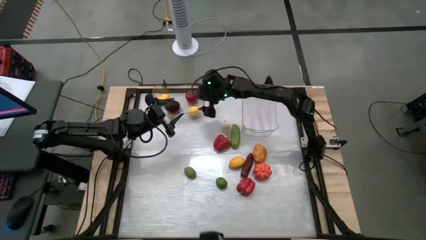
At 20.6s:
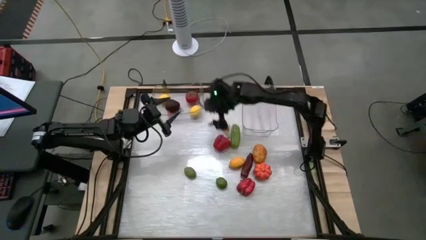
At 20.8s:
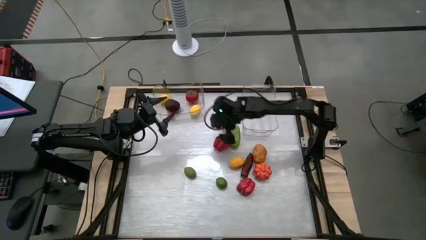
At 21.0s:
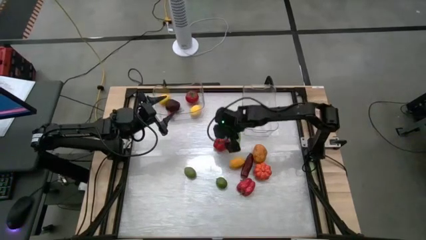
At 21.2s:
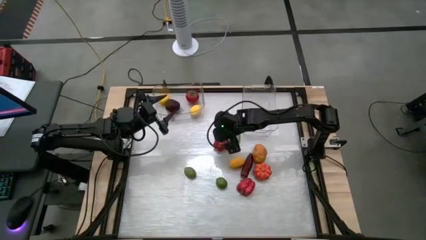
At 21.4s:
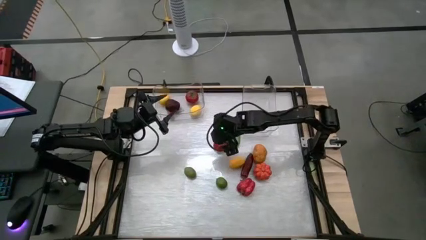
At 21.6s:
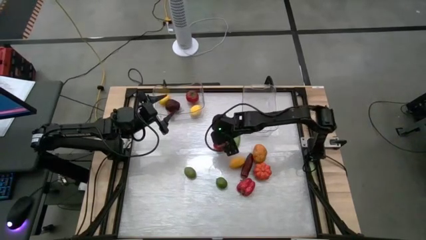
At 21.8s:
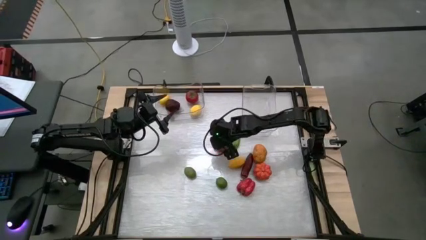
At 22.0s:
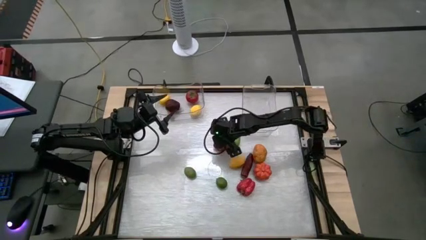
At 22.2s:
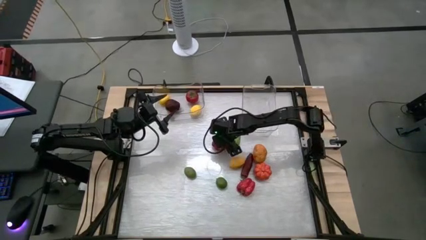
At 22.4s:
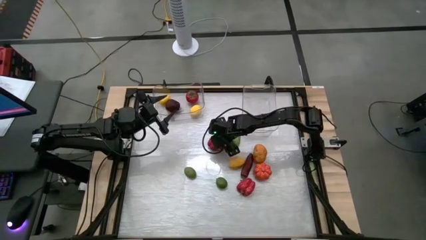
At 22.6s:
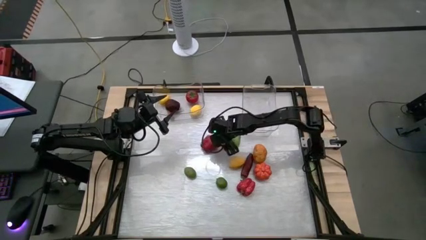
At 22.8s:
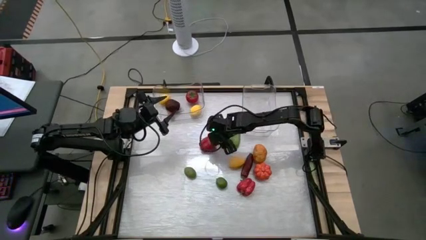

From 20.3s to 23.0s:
Task: Sort produce into baskets
Put the top red bell pepper into the right transparent bin

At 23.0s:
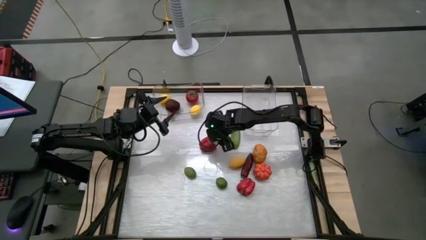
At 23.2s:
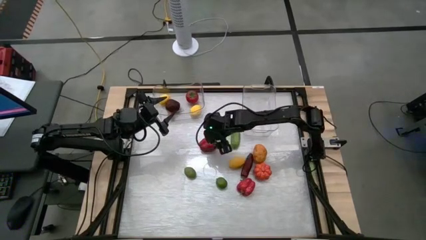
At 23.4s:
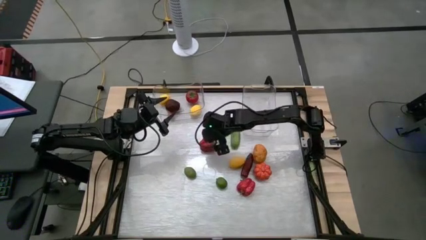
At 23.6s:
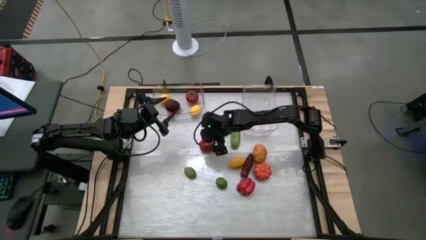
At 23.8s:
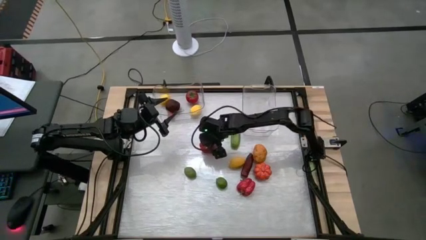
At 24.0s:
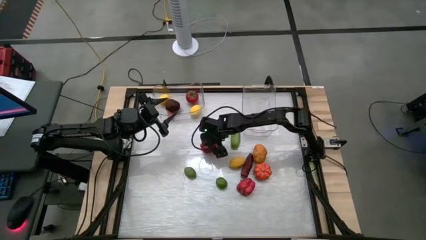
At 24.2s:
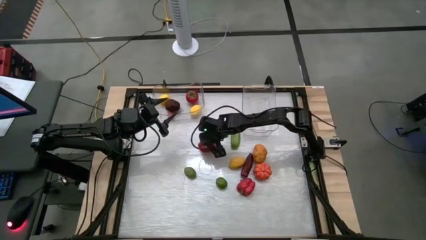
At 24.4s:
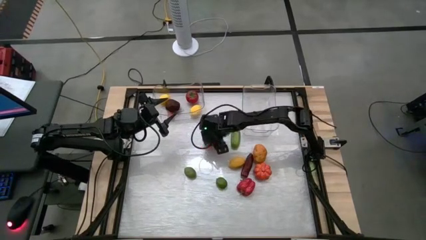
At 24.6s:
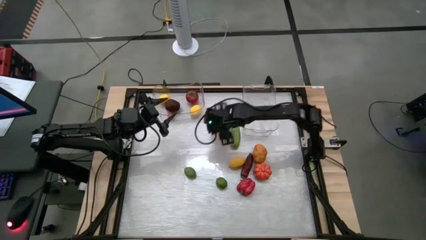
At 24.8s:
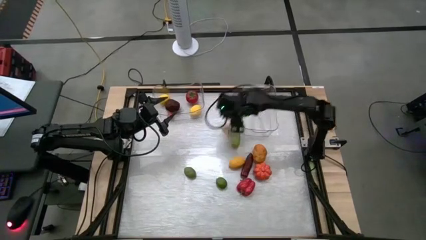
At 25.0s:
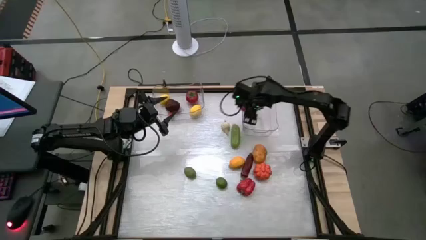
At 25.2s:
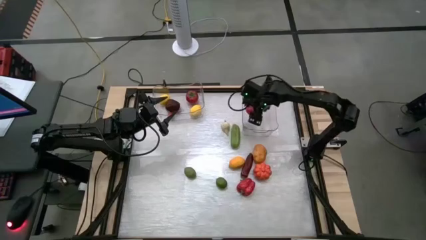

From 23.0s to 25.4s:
Put the top red bell pepper into the right transparent bin

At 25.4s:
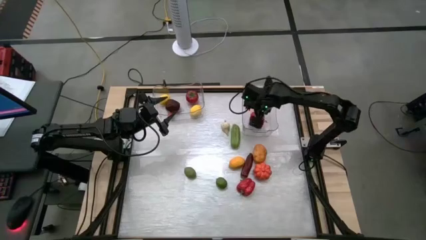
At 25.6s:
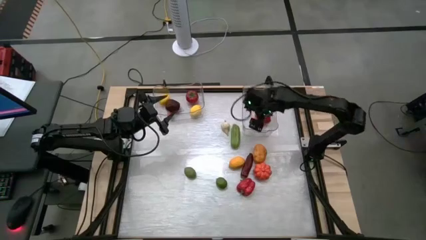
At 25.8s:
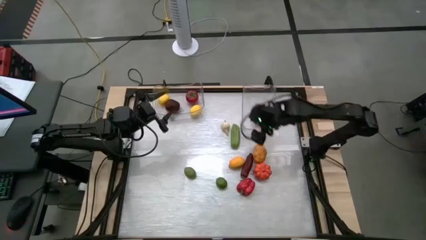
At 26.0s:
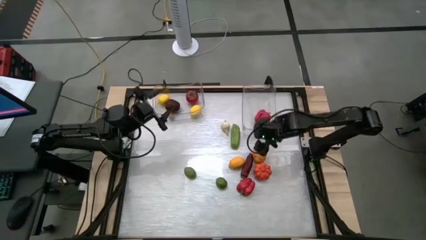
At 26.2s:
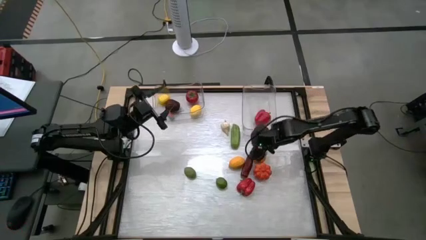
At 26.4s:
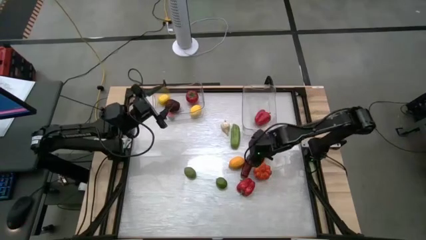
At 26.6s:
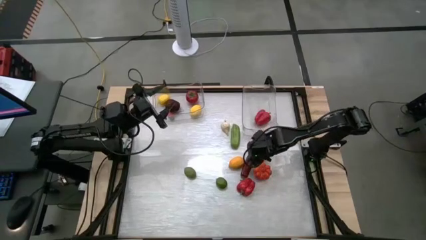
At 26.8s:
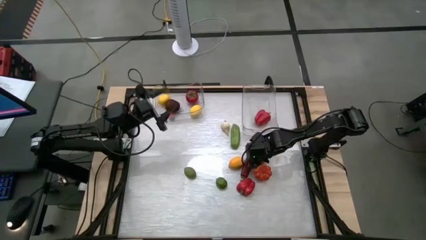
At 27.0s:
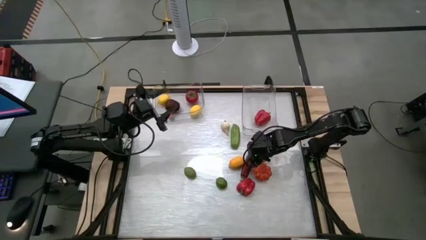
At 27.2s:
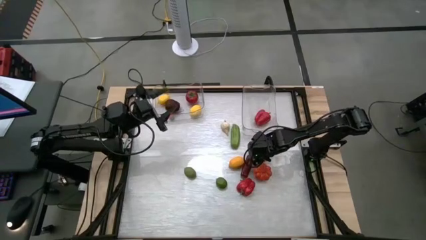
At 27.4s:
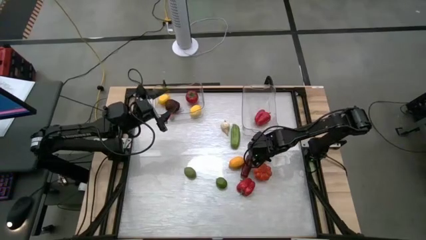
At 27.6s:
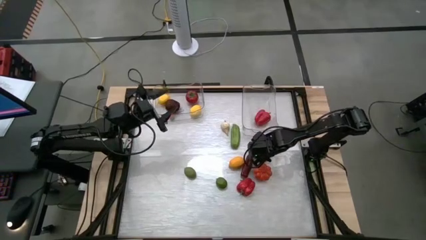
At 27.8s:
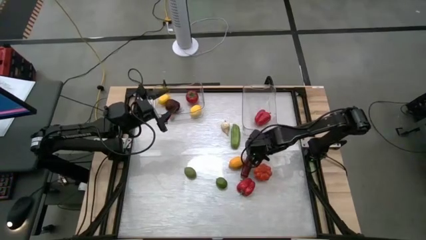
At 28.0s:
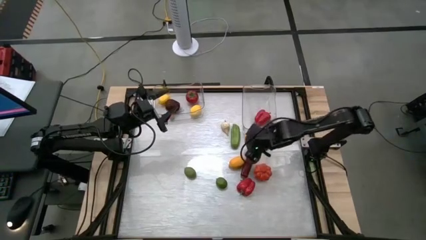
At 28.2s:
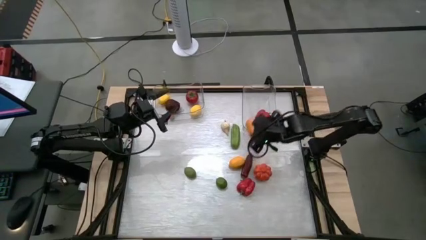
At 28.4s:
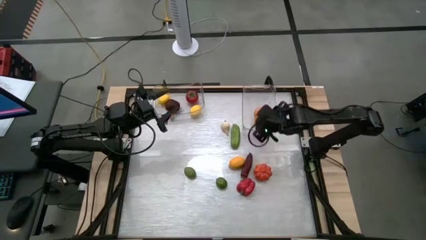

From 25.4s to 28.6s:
Put the potato into the right transparent bin

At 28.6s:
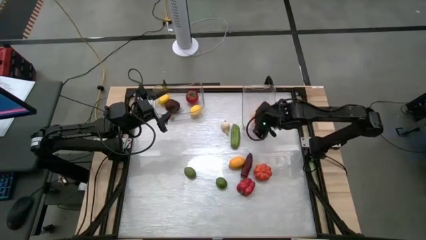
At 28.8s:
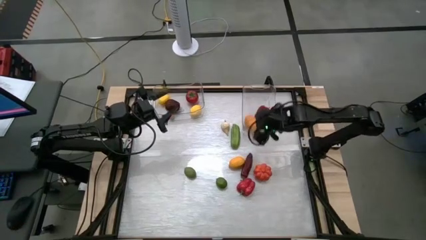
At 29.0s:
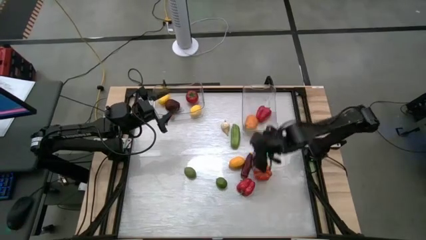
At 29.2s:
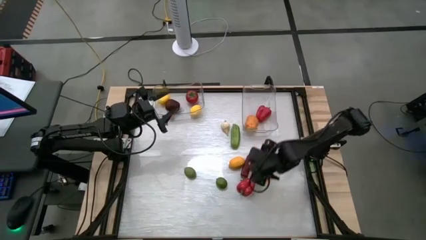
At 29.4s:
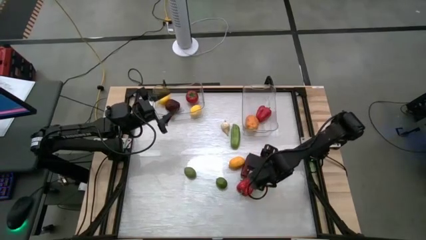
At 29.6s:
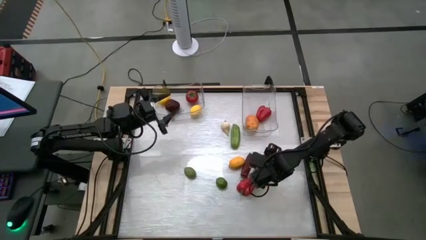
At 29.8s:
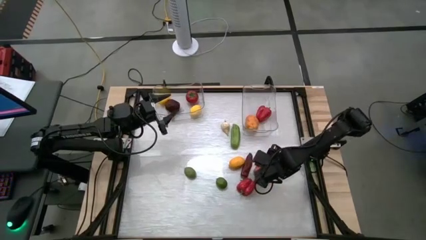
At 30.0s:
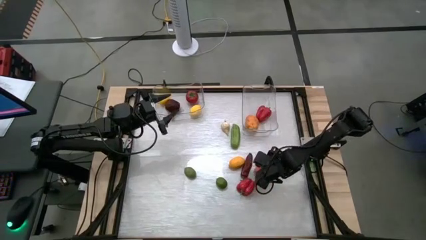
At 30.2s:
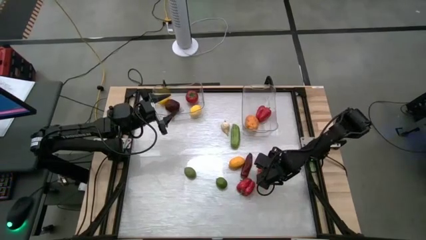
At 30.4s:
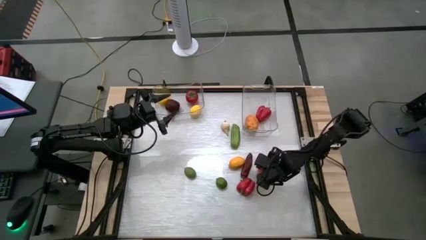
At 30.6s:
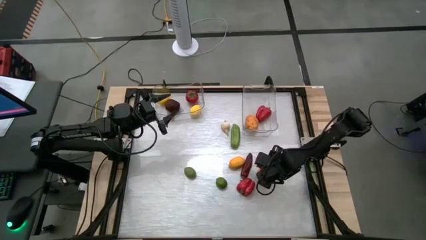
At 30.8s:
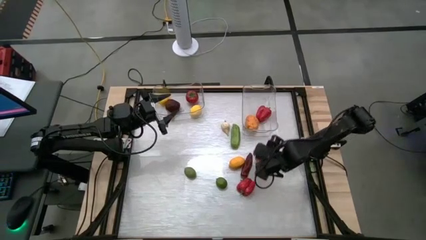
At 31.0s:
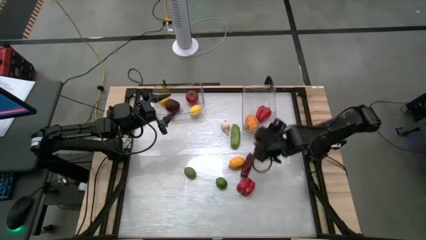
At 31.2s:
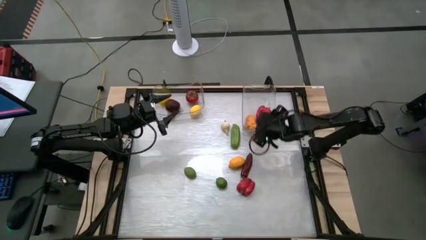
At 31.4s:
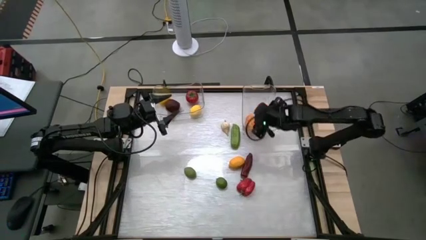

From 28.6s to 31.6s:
Put the pumpkin into the right transparent bin

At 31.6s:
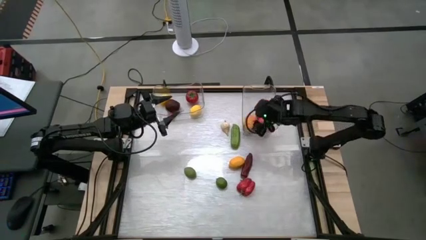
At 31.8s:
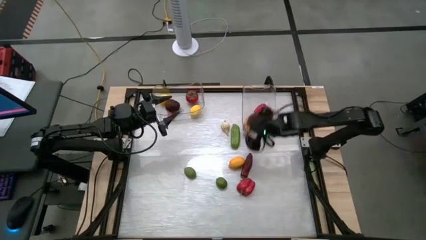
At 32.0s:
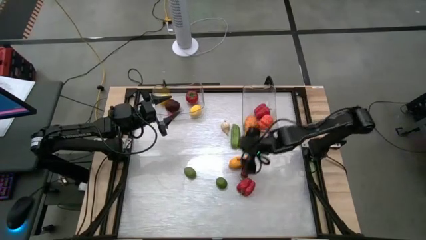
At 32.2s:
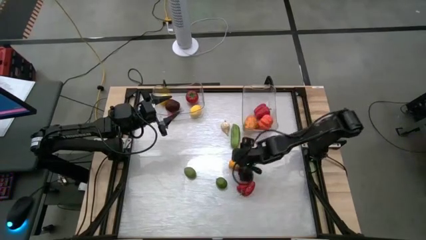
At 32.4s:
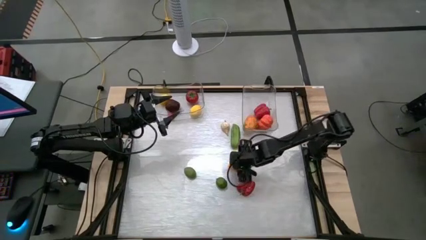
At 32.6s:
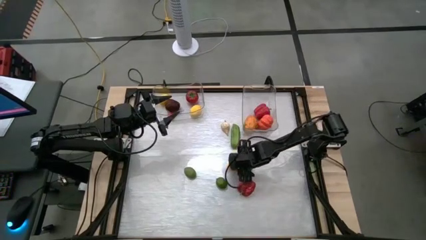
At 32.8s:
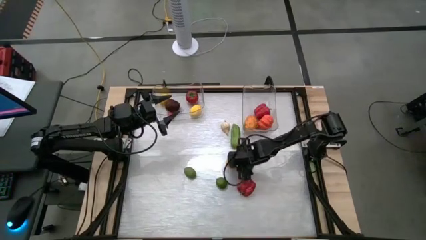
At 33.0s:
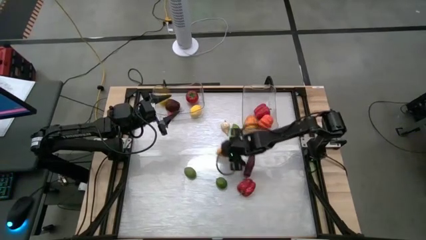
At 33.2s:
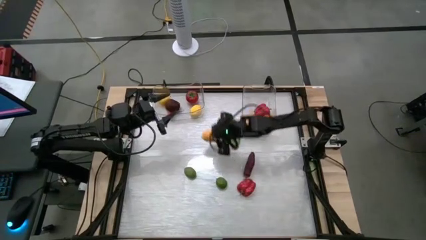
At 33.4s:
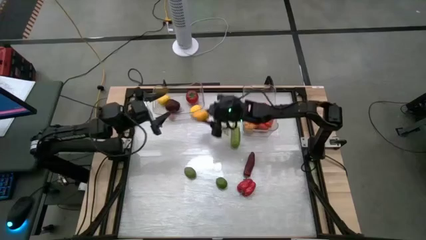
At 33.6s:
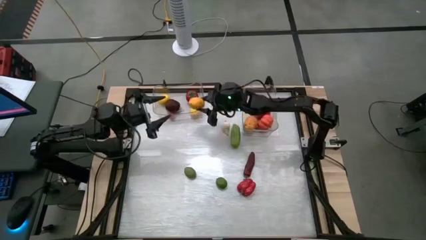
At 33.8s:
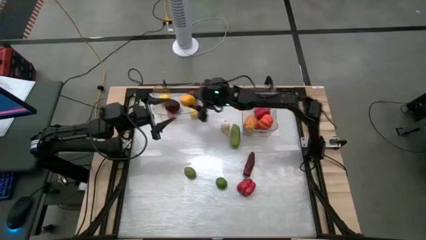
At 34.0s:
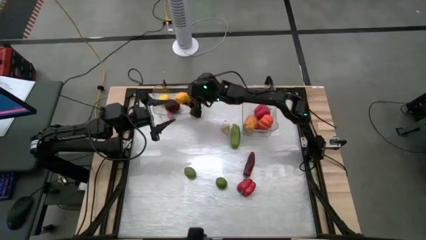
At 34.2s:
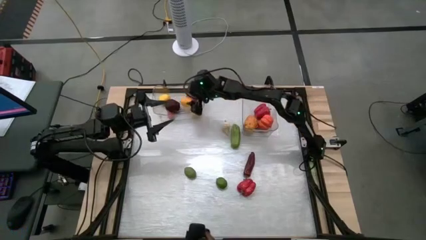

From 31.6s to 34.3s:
Put the lemon into the left transparent bin

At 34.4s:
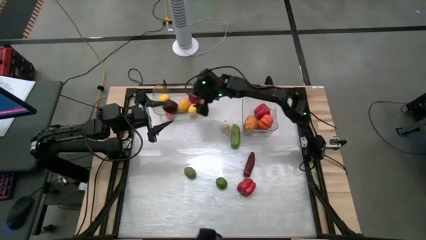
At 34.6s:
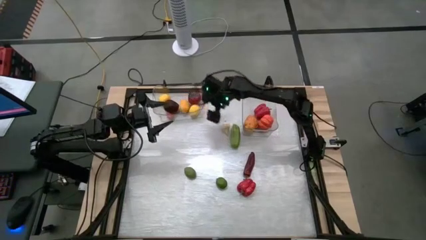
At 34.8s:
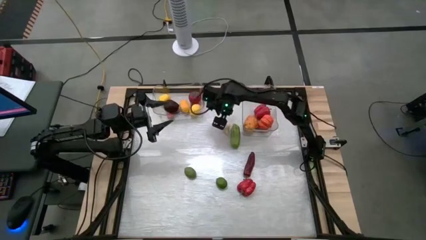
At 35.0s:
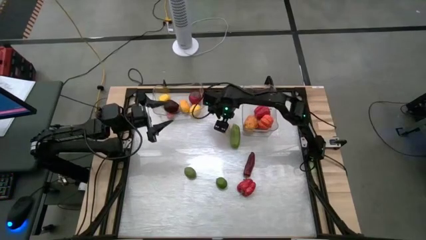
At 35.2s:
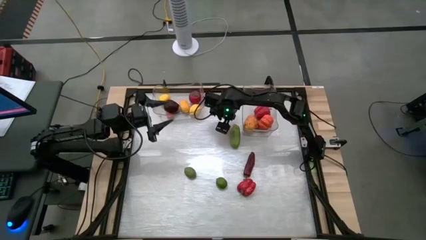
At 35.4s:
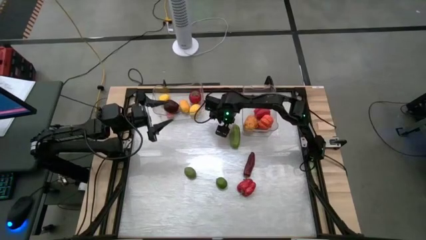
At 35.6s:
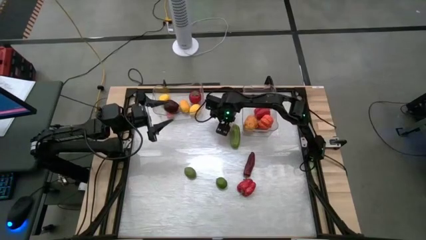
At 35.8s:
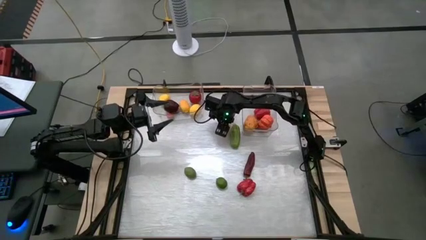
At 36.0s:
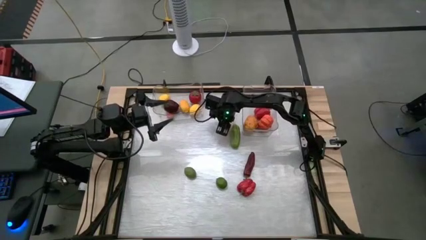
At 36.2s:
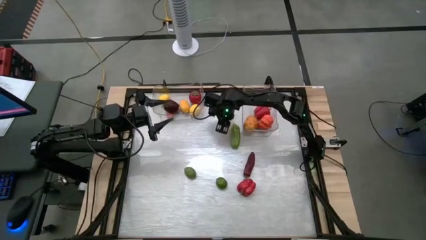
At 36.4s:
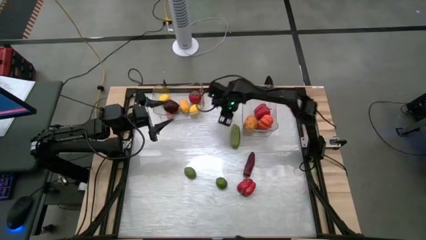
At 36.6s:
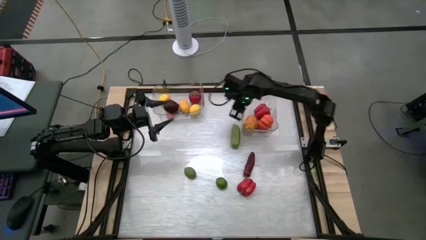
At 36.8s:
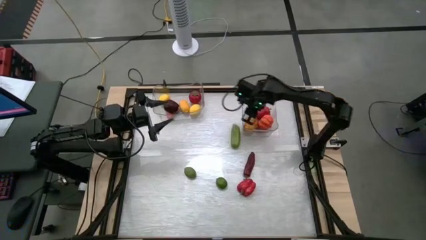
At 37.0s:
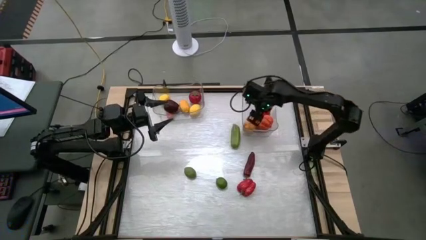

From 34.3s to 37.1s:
Put the garlic into the right transparent bin
